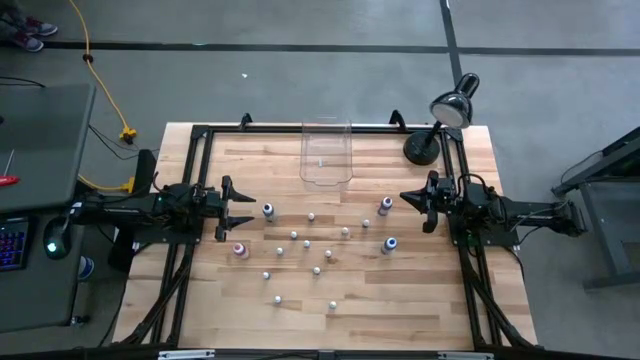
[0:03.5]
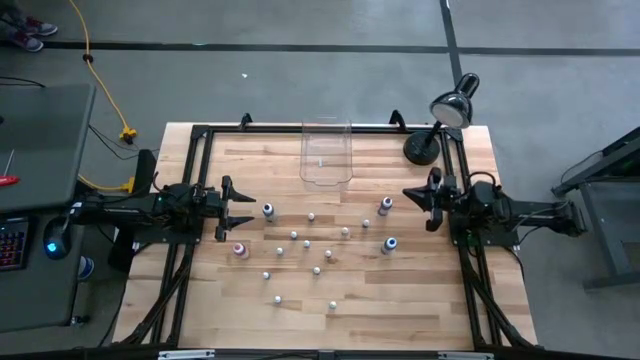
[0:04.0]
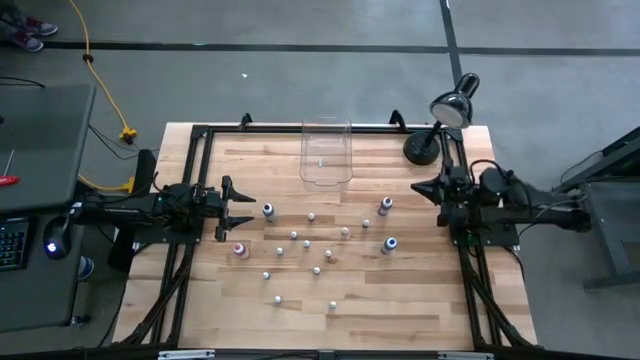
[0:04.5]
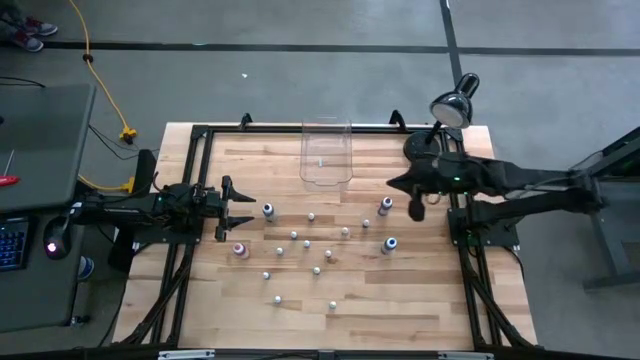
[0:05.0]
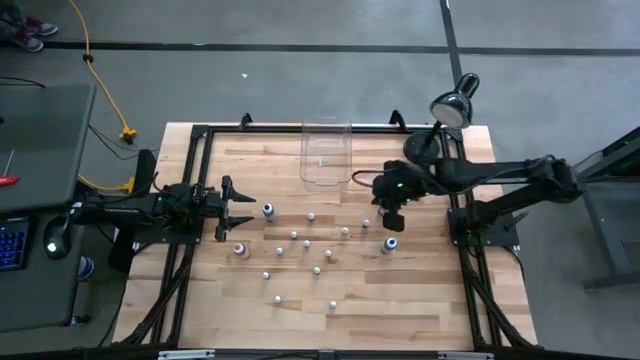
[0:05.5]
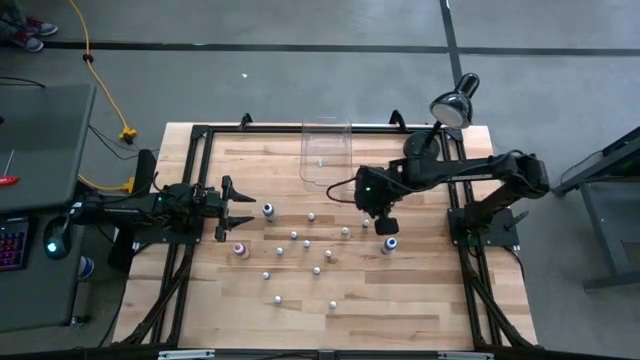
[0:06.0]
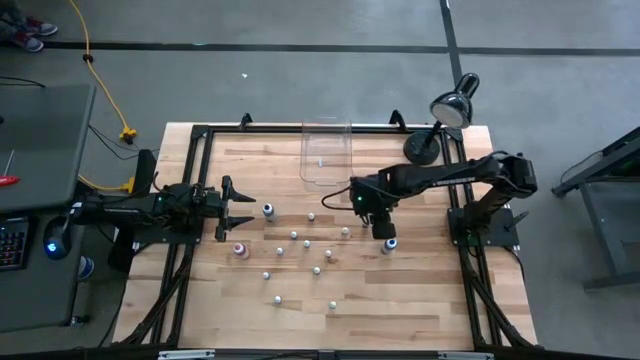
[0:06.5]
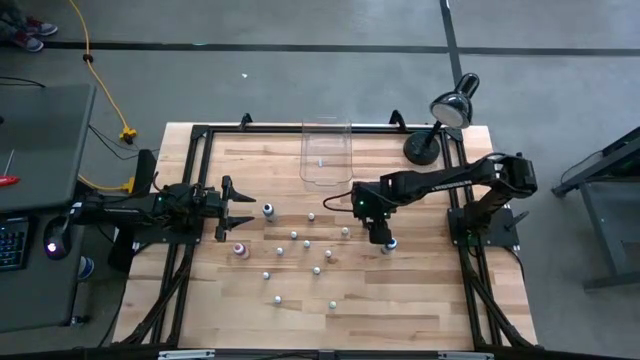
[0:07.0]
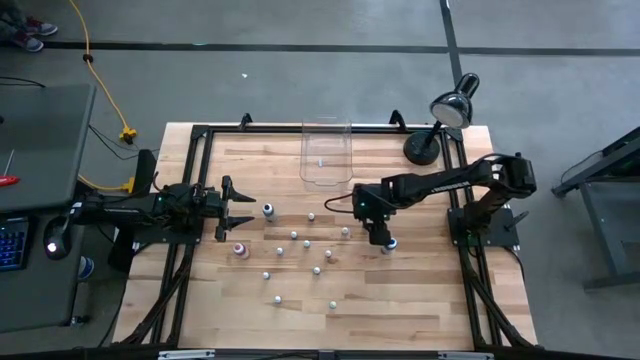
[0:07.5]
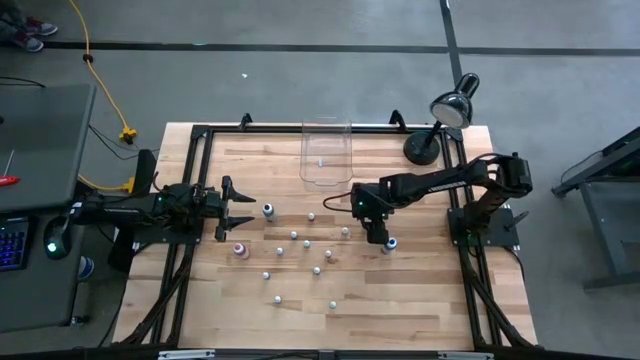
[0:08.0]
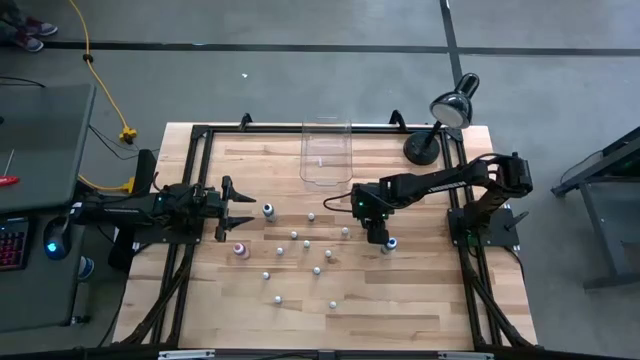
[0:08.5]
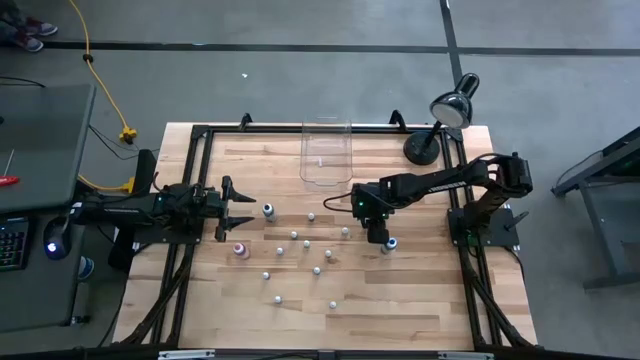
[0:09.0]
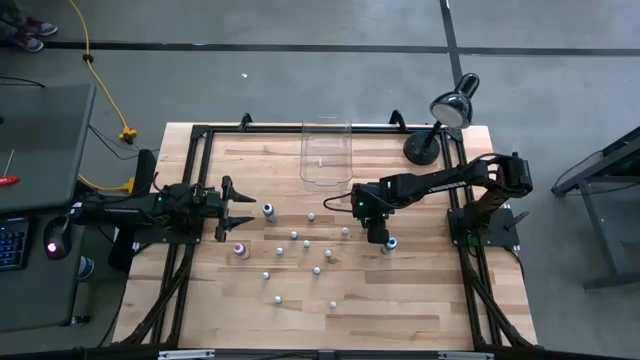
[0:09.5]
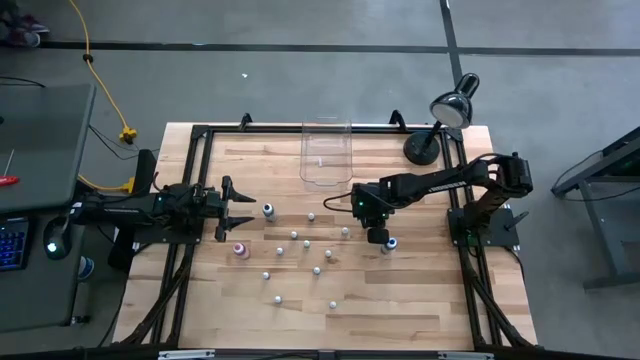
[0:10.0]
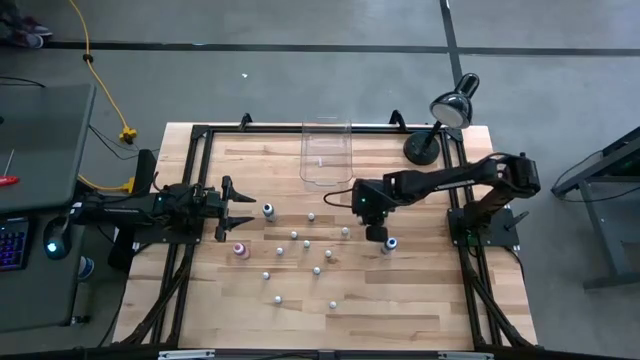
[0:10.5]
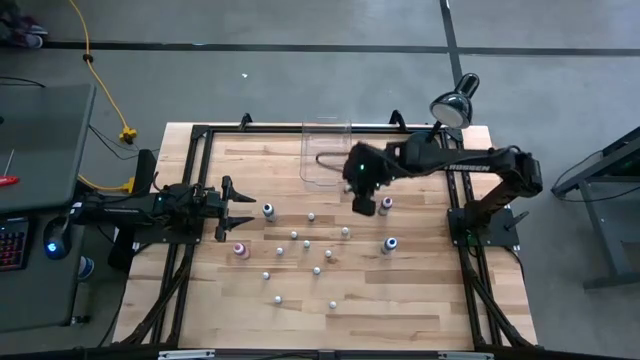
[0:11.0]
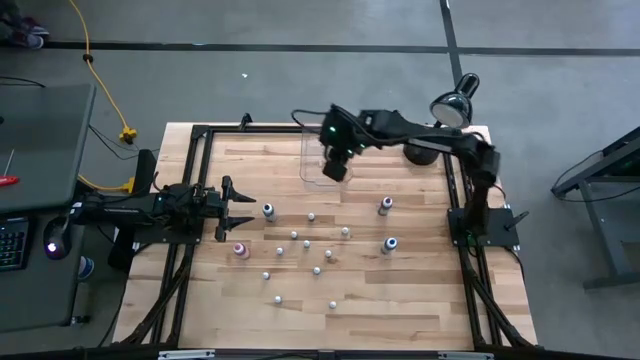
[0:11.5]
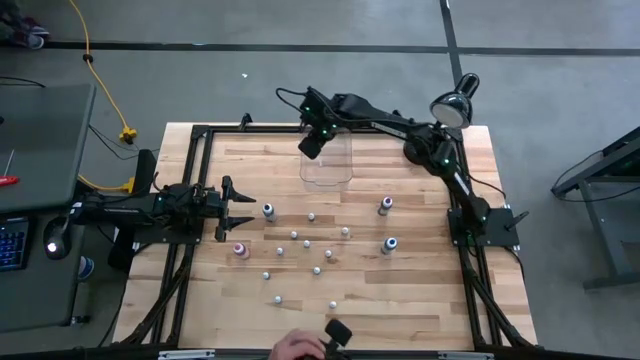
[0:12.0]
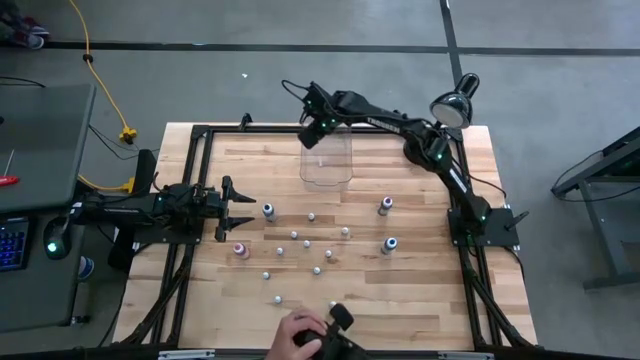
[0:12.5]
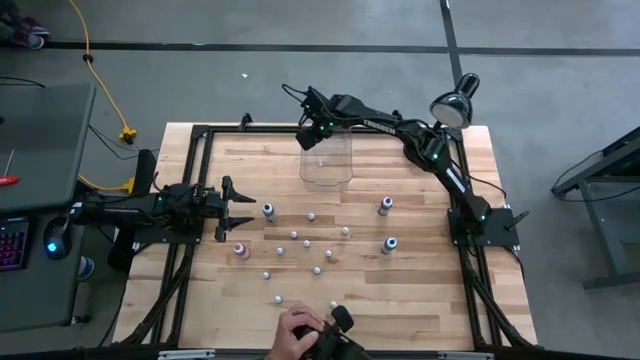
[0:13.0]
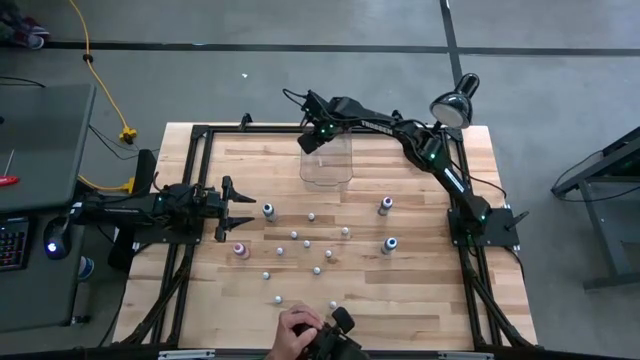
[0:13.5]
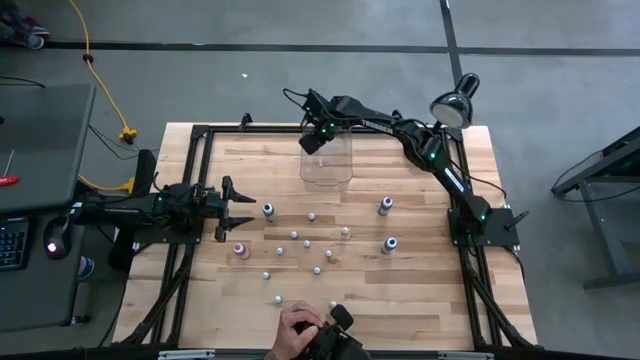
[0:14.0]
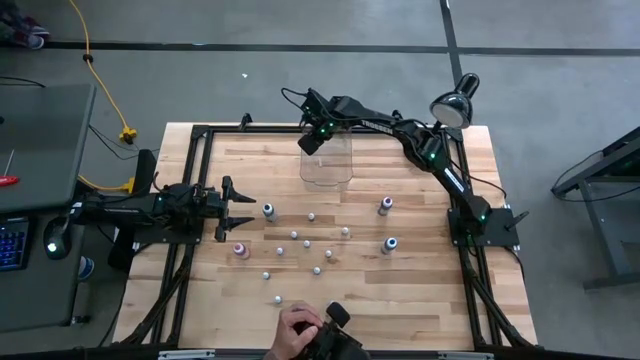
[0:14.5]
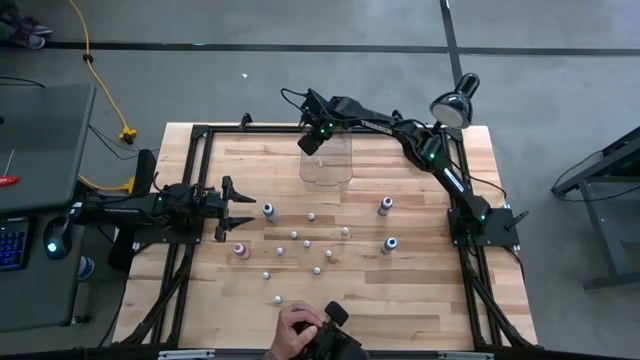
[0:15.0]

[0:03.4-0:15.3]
Task: Pick & Place food coloring
Put the small food coloring bottle into the transparent bin

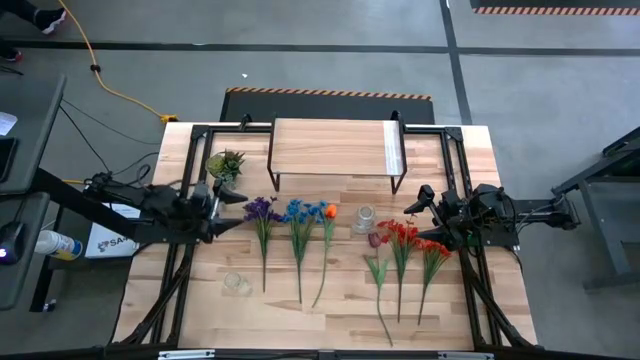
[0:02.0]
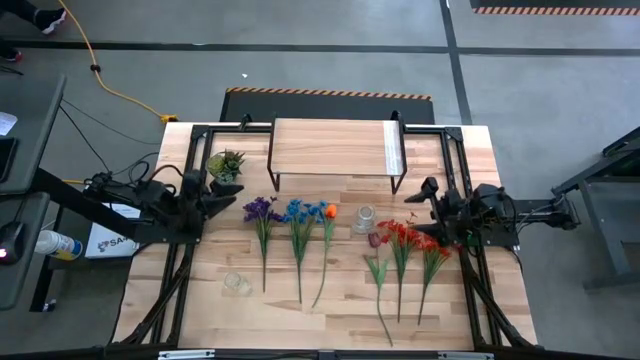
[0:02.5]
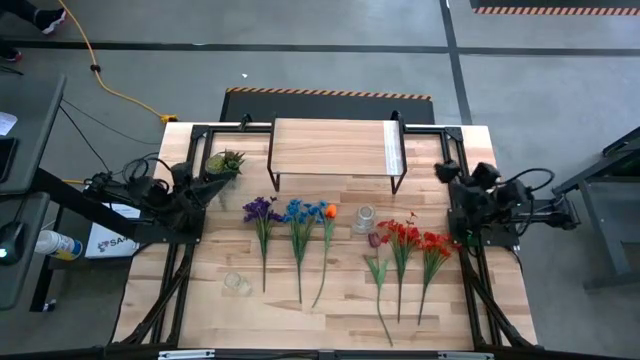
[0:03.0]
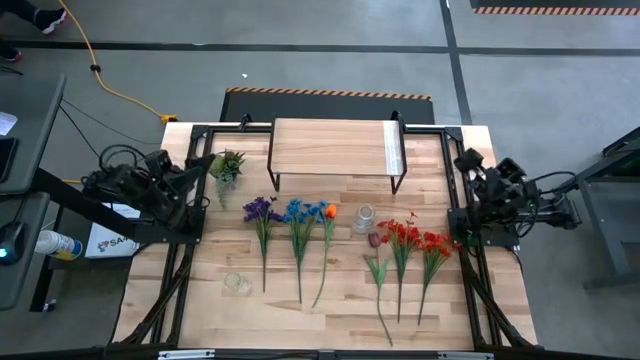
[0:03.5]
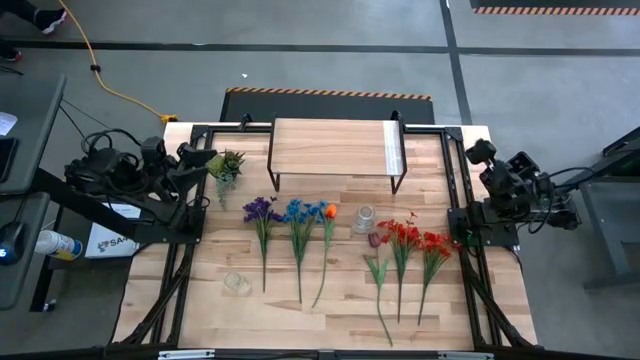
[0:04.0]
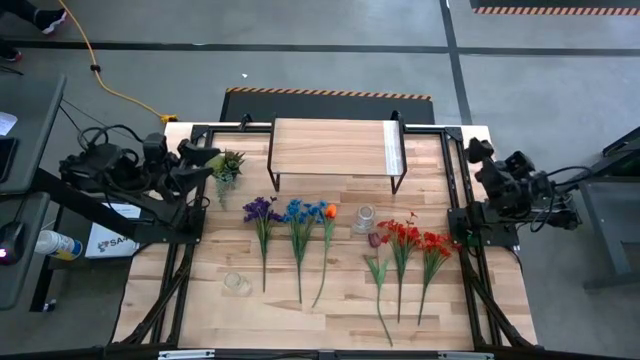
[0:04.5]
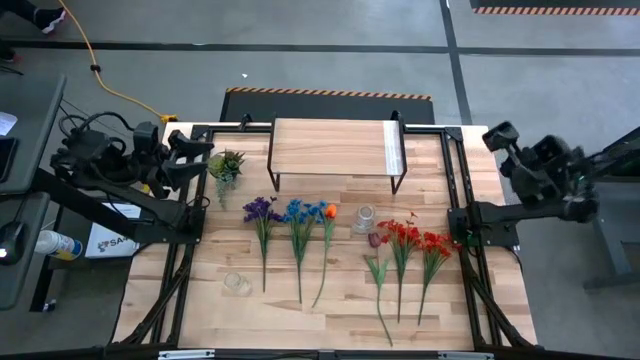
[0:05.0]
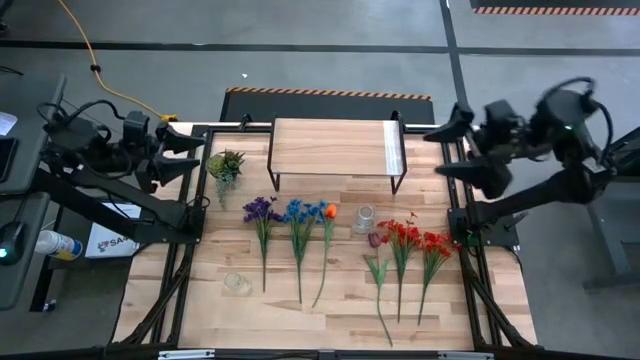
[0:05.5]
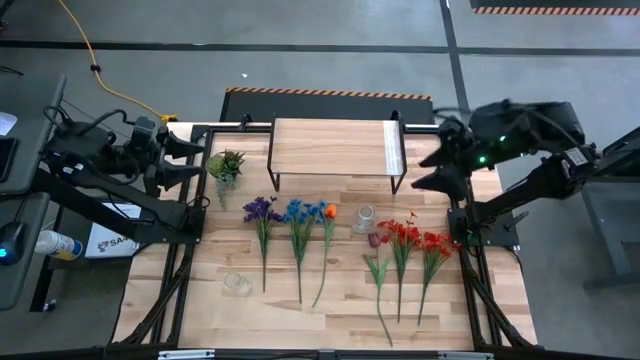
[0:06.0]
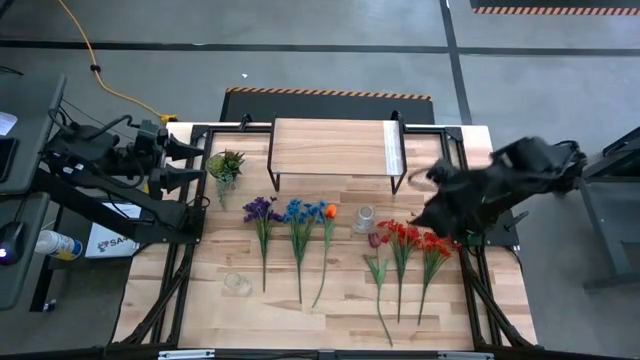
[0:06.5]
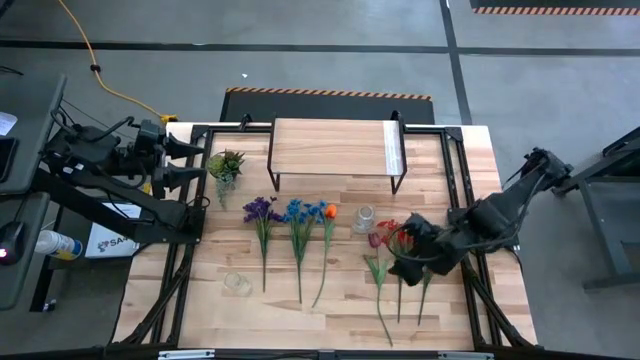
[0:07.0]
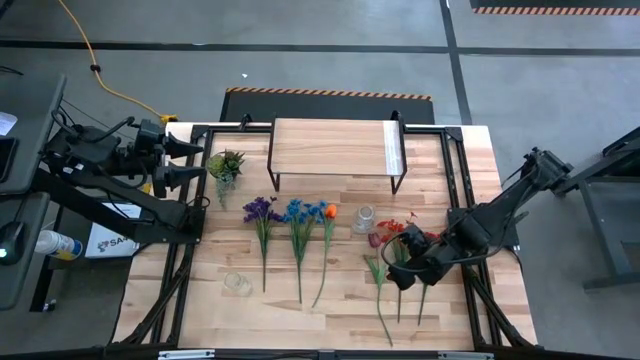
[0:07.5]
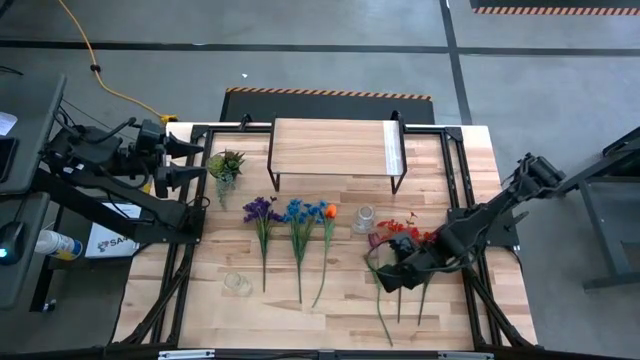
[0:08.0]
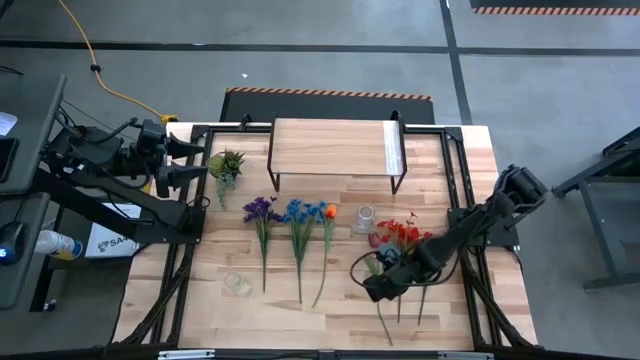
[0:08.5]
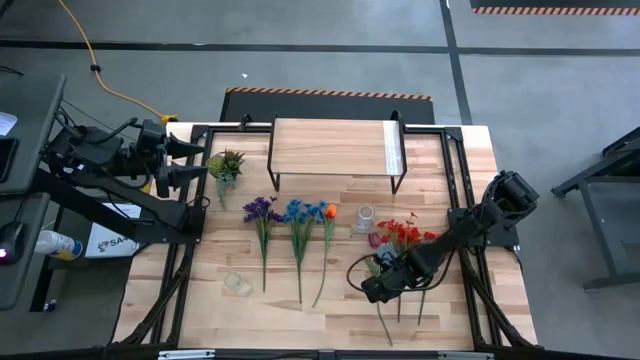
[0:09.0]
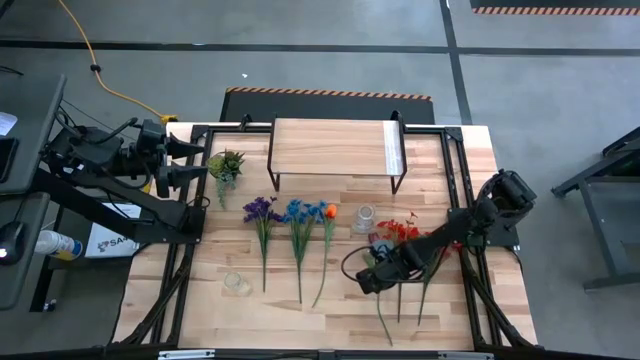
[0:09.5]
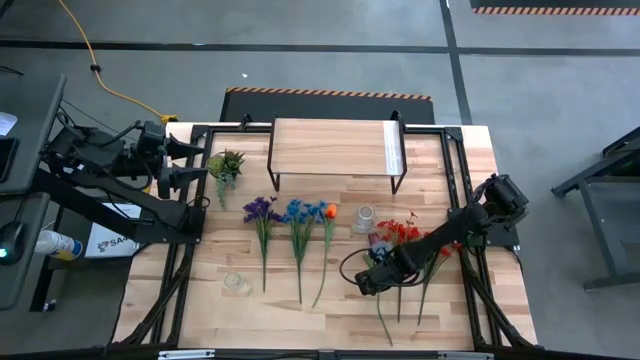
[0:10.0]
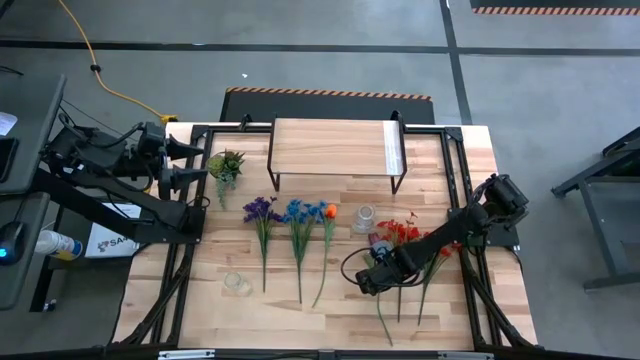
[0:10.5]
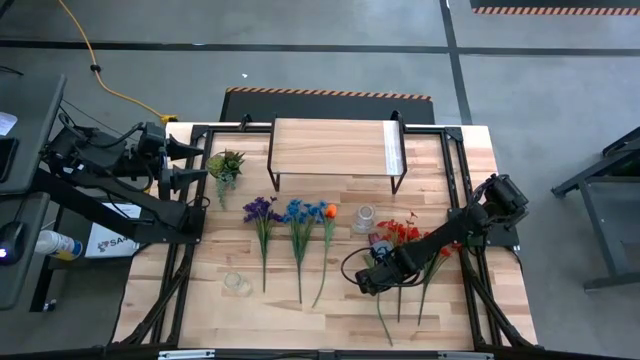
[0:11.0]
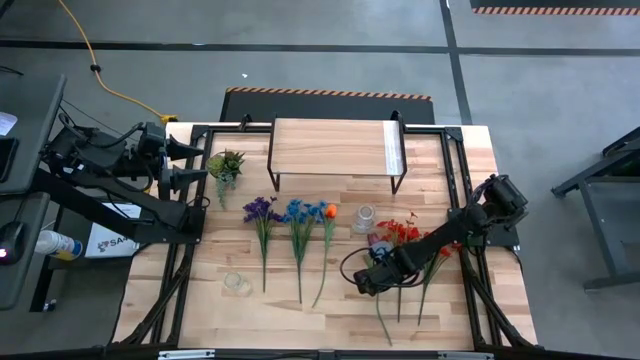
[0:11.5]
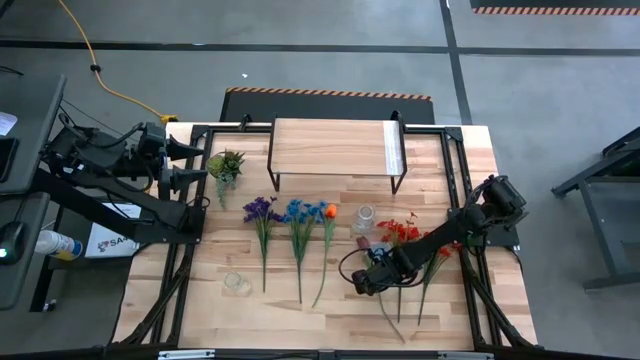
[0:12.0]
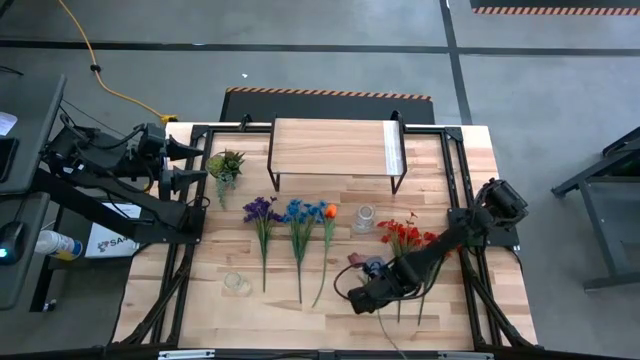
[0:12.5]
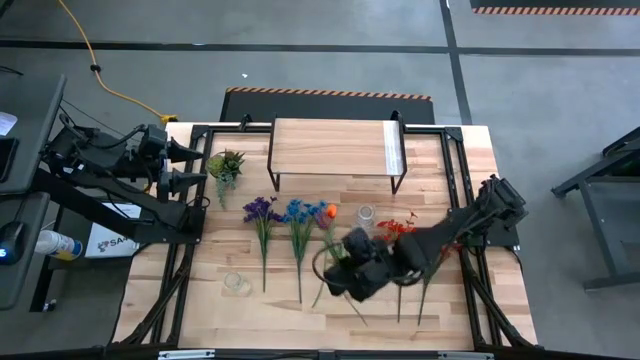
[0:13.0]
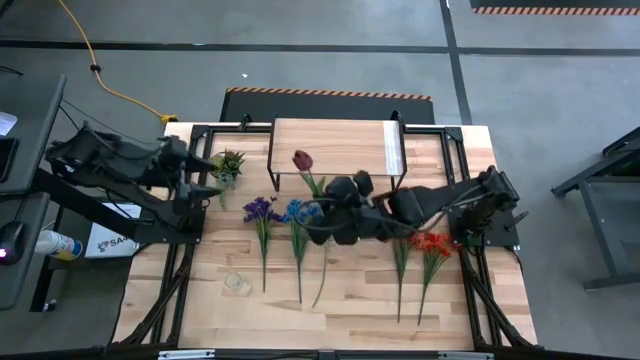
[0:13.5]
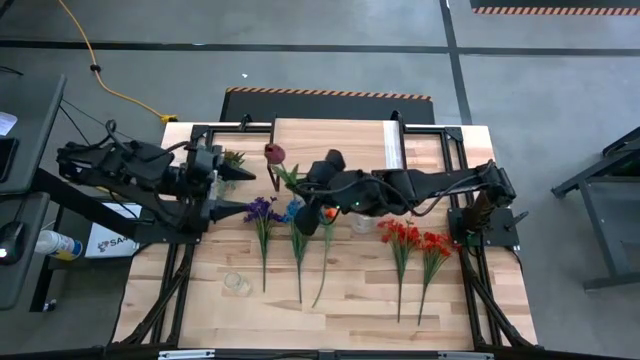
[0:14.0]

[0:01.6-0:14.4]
Task: Pick and place flowers into a vace then onto a shelf
Put the red flower into the bottom transparent vase
